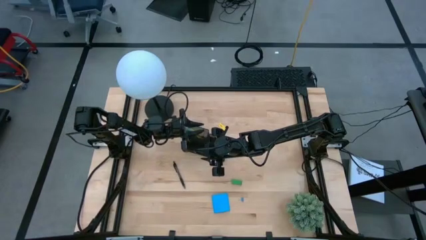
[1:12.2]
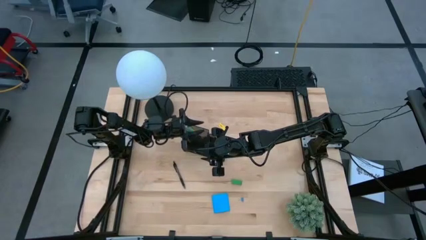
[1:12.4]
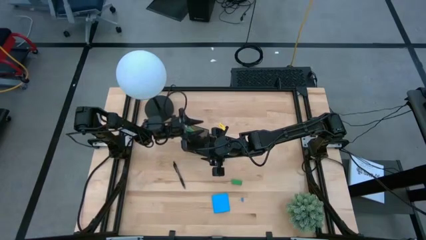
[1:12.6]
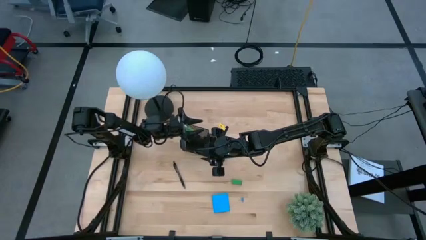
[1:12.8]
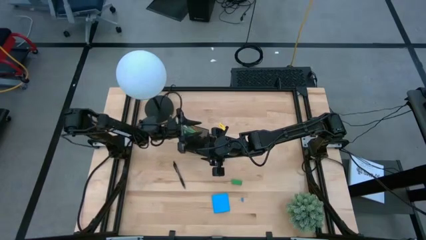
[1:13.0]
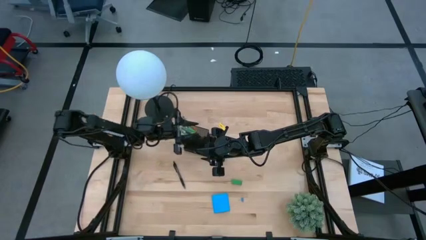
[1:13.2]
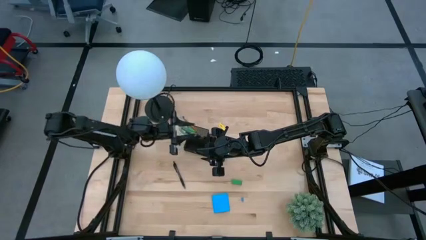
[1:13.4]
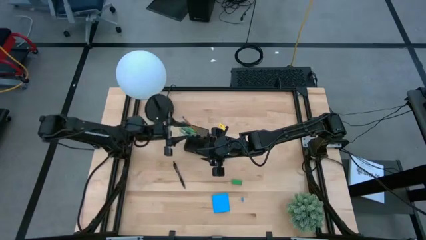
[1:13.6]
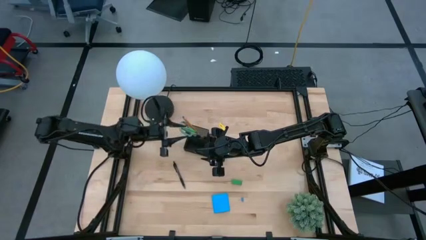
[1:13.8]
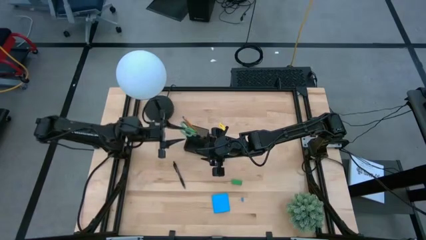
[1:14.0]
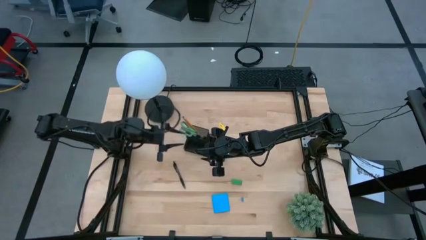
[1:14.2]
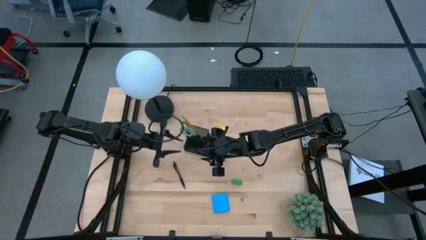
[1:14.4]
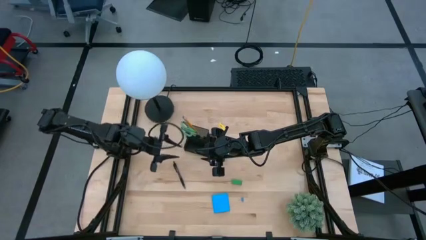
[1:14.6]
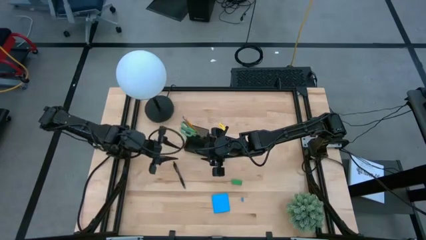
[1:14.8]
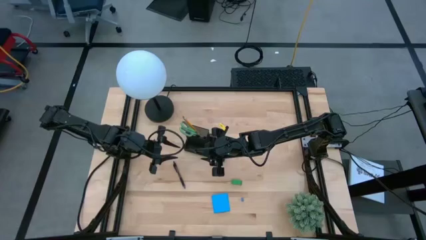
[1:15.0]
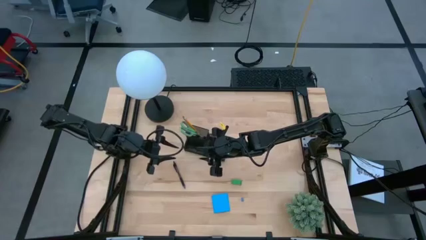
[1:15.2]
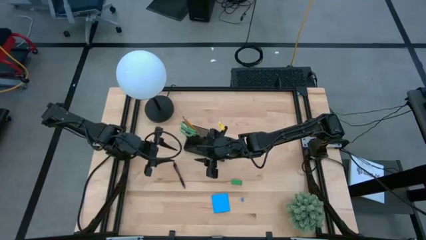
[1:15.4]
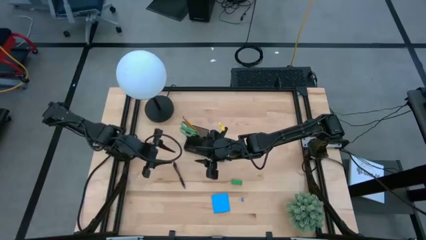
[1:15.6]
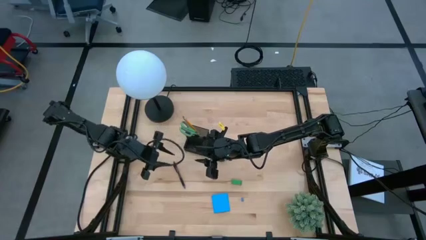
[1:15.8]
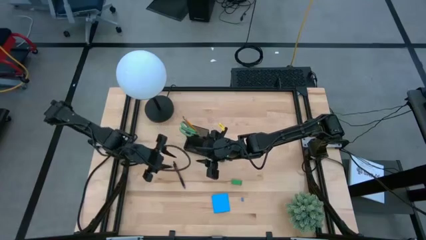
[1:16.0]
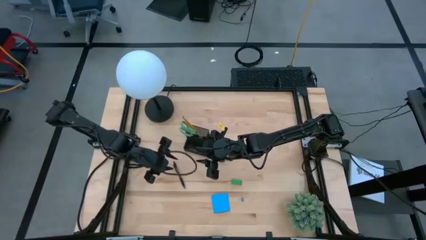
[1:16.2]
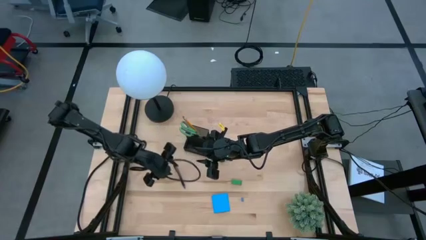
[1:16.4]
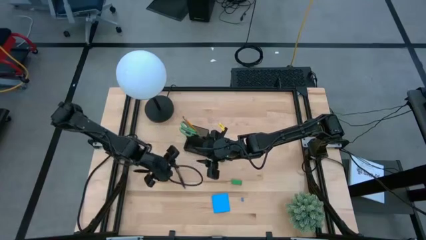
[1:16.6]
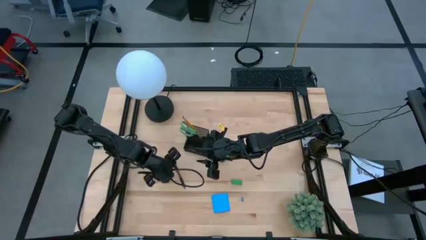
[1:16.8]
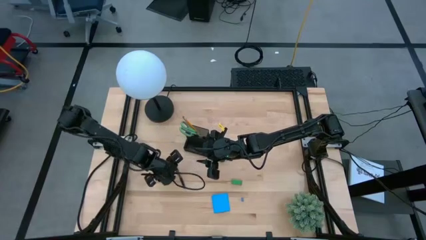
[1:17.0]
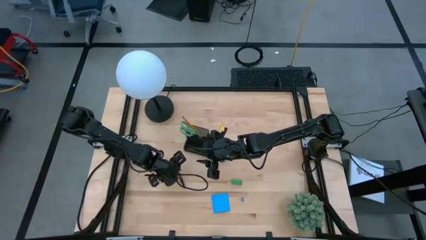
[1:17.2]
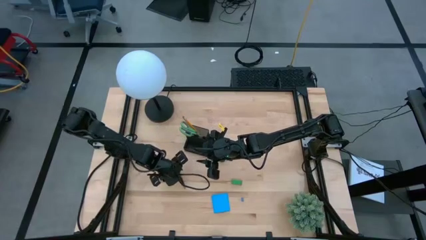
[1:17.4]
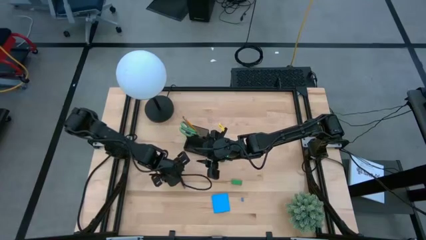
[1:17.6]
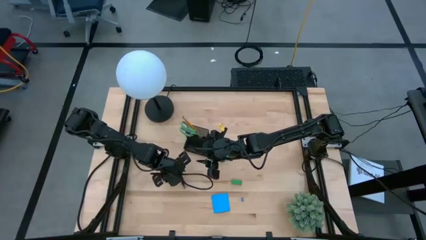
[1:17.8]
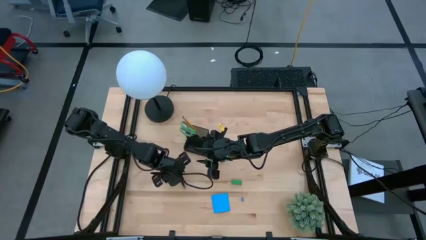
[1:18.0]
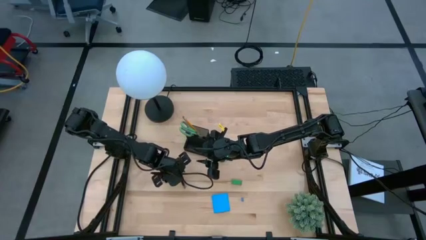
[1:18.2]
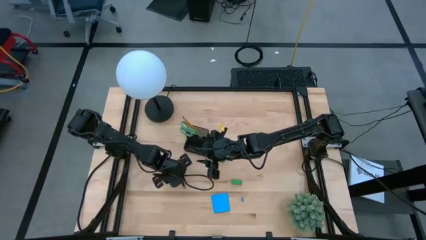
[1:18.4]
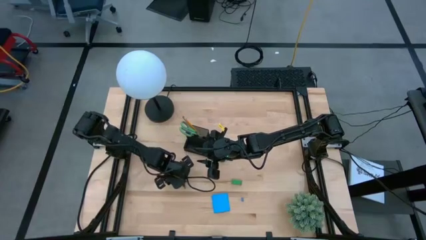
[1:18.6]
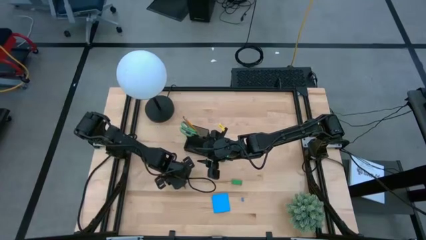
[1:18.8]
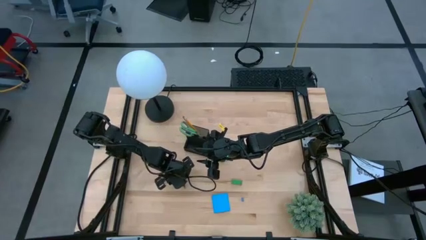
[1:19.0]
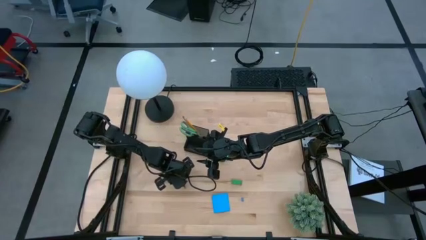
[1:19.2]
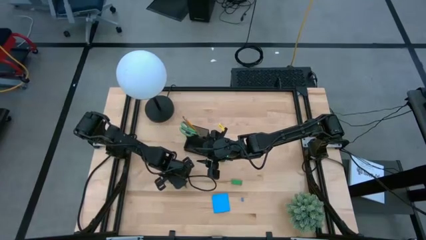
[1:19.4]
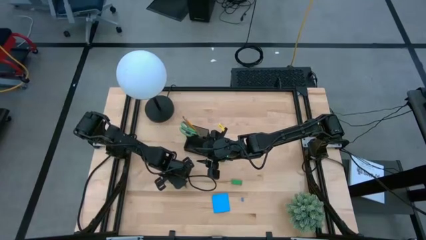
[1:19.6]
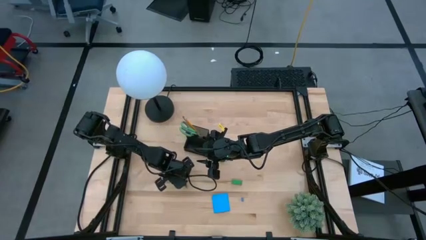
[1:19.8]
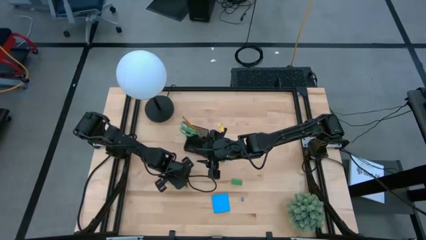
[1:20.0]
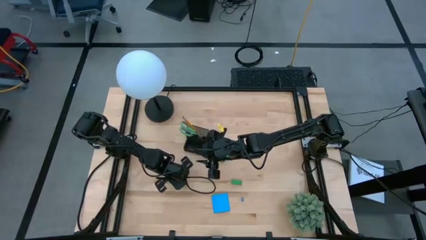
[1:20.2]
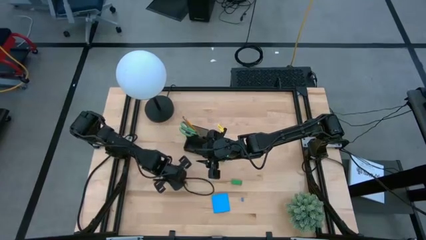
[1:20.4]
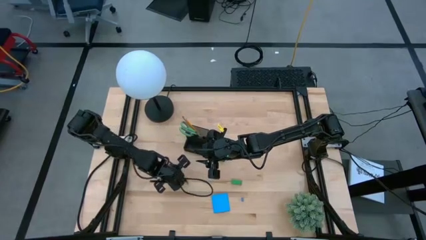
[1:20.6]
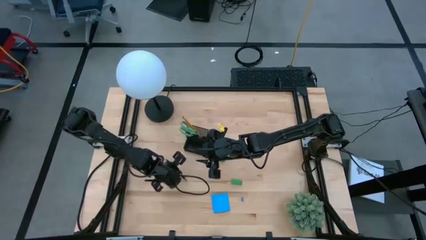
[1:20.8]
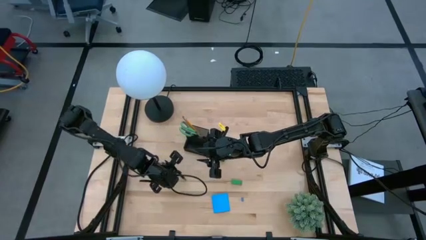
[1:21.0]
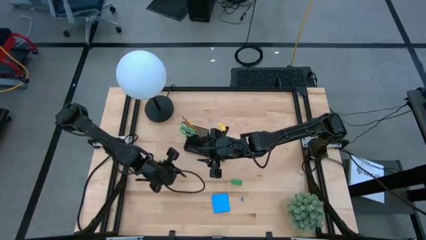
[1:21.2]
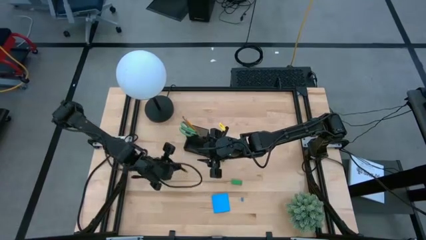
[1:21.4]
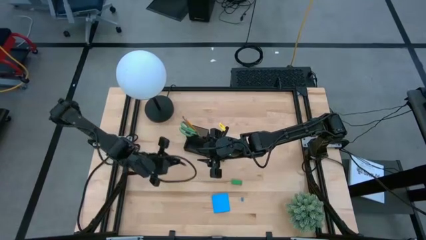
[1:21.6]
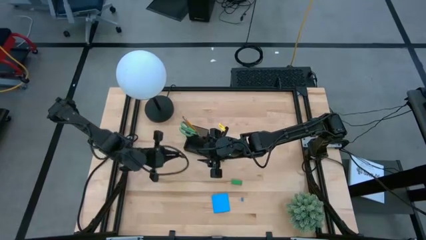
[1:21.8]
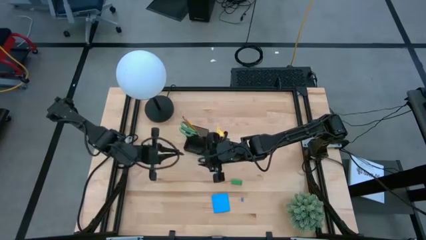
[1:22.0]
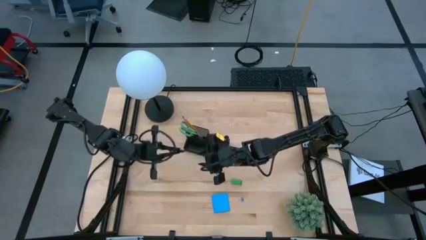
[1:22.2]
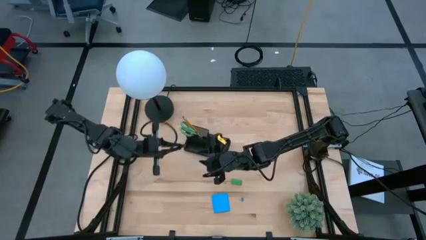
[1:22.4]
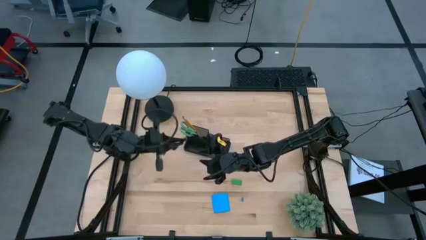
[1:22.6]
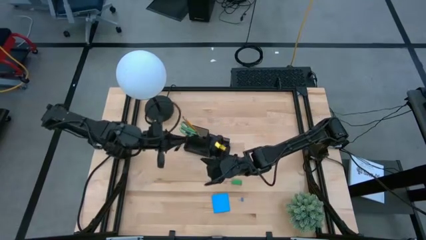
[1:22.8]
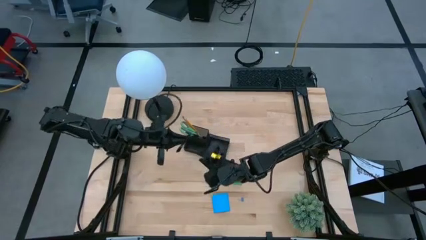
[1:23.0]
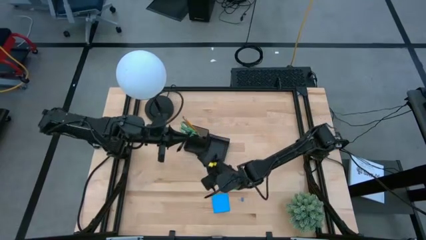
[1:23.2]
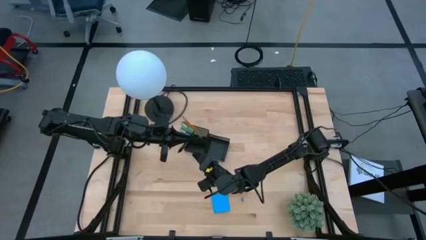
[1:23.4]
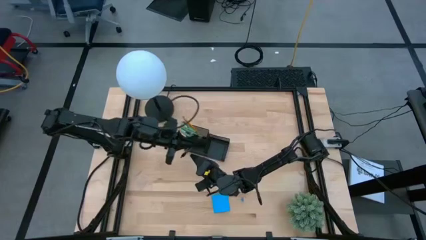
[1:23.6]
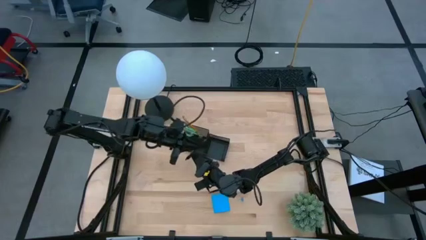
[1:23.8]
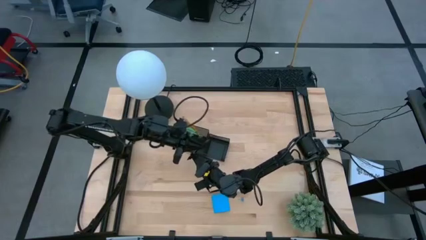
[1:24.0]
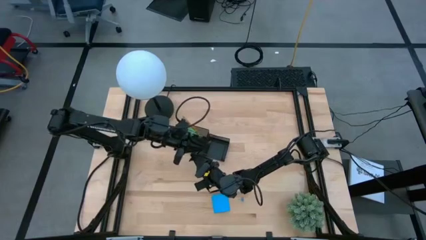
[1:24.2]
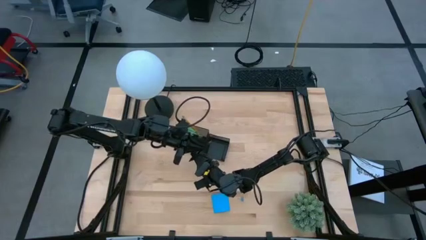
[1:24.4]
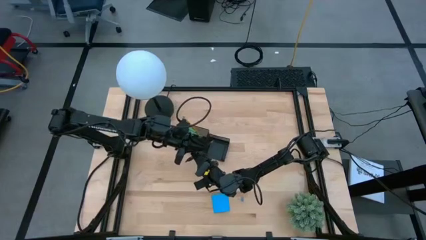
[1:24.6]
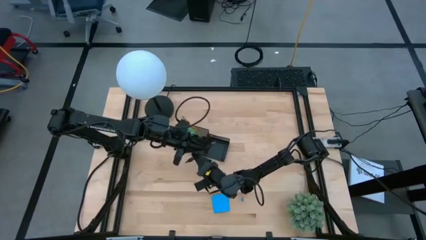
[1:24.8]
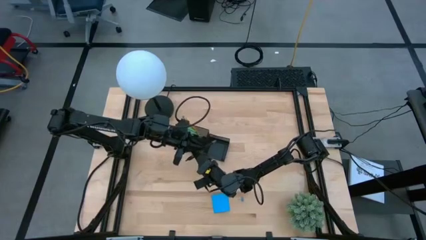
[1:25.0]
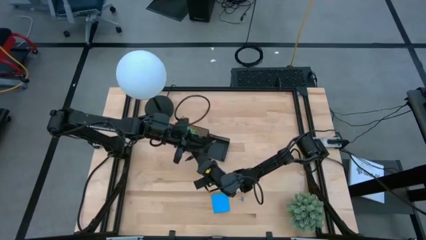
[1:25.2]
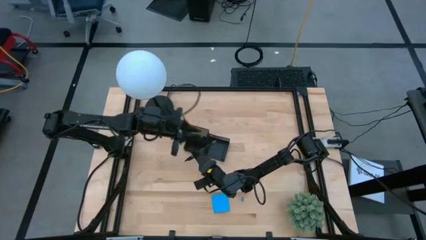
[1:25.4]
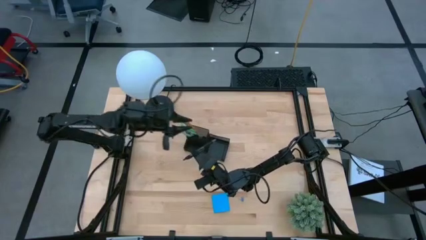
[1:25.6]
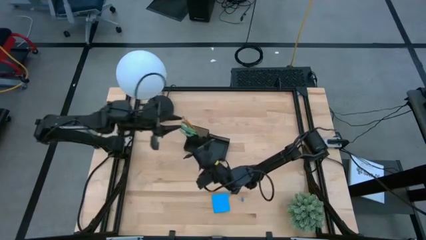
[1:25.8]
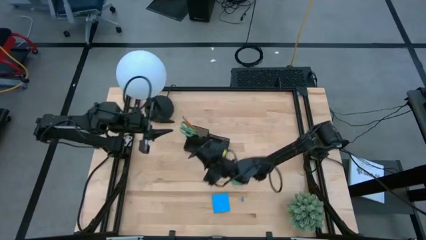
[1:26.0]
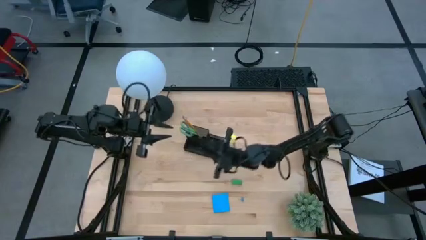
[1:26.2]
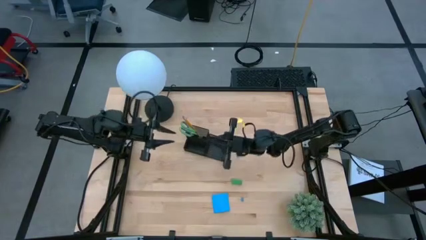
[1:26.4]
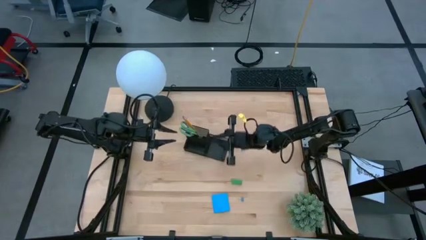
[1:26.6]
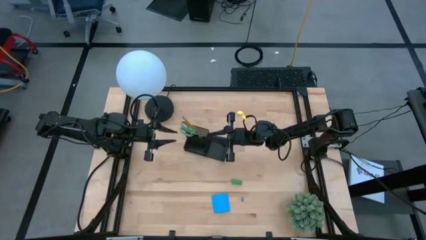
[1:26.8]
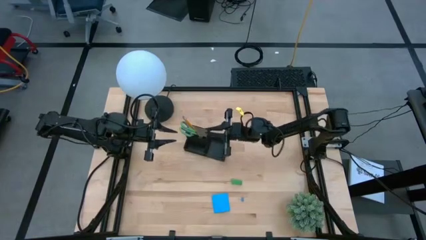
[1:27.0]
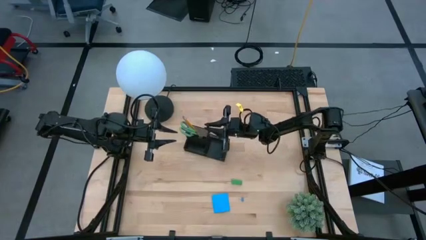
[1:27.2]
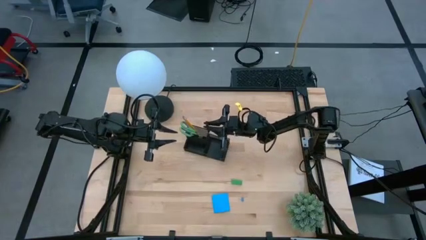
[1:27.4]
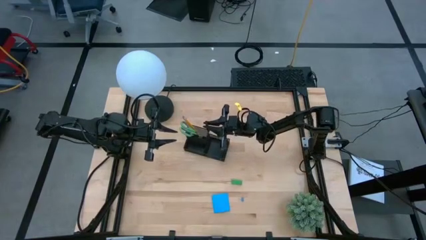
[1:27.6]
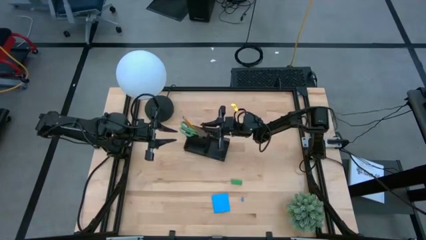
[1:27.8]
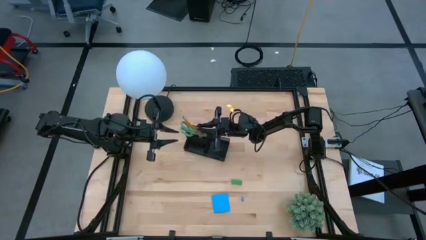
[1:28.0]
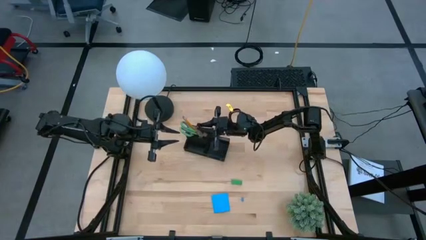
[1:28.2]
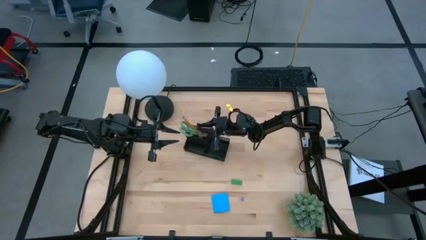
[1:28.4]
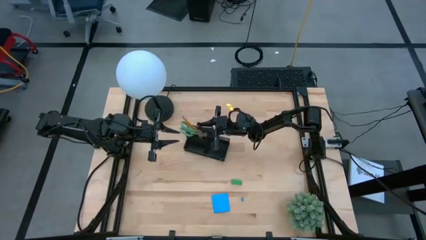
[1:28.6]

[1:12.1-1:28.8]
Task: Pick and place office supplies into organizer
Put the black pen into the black desk organizer
